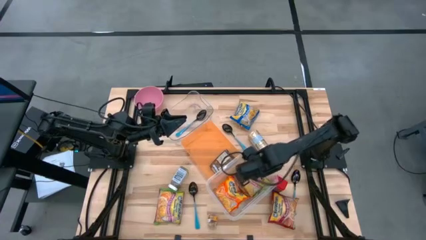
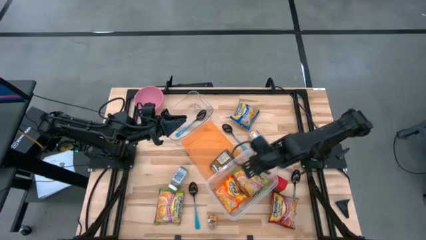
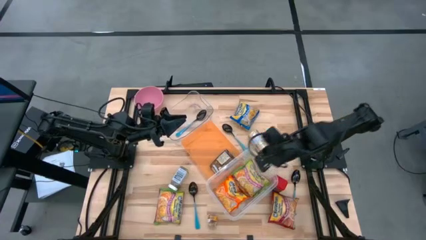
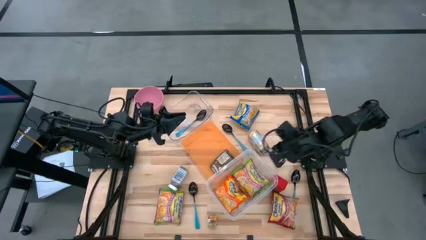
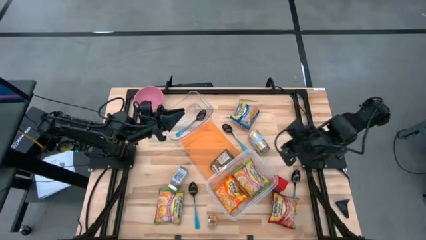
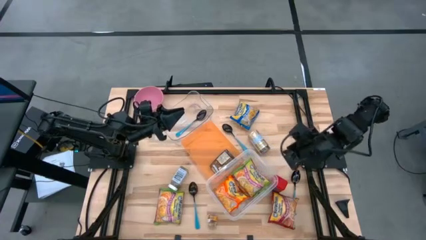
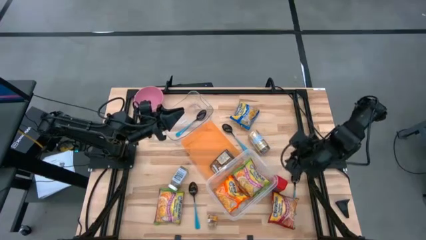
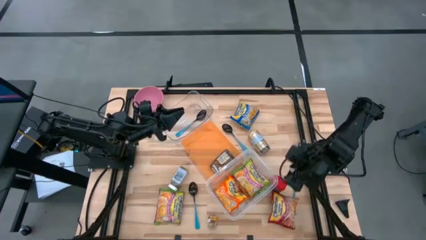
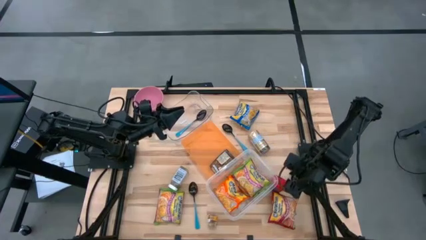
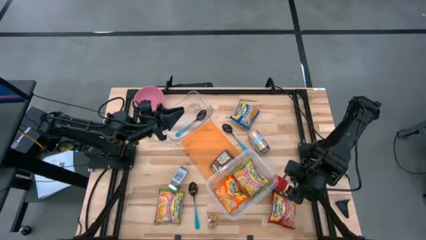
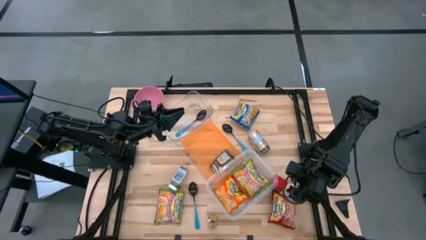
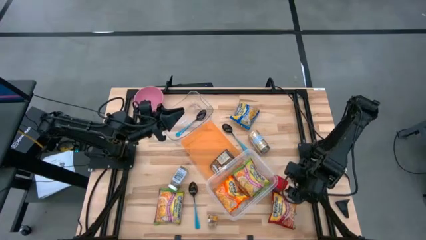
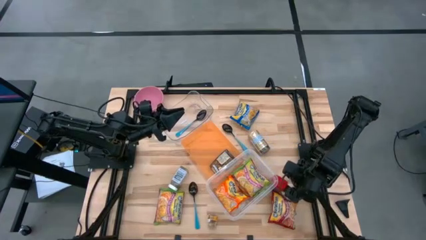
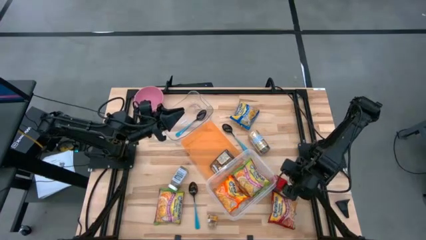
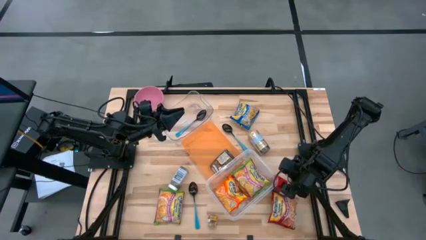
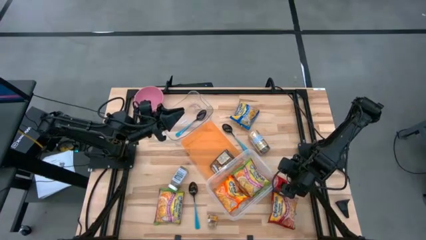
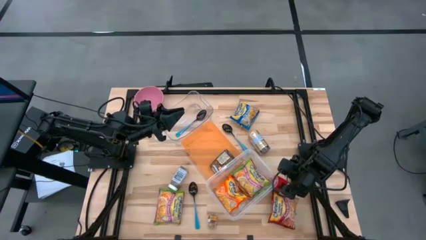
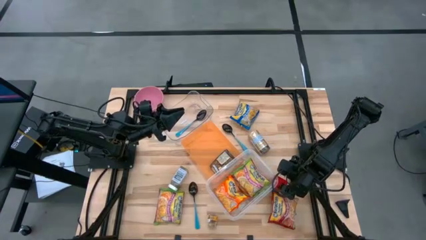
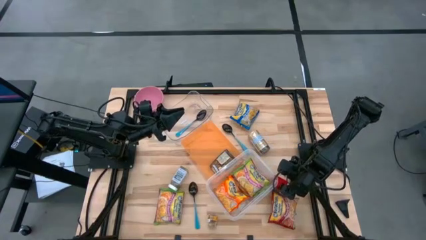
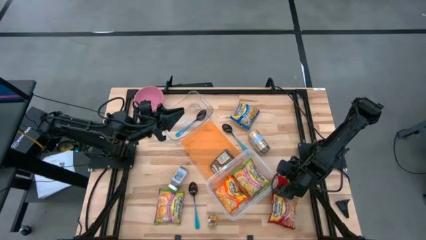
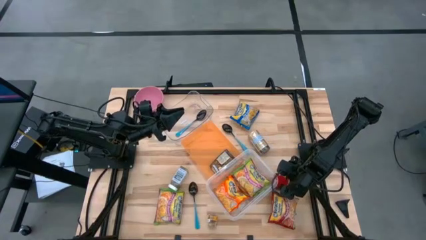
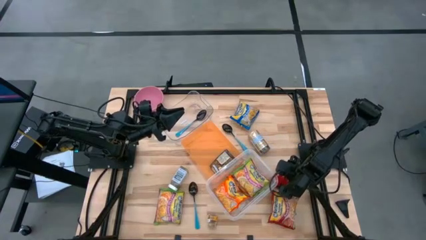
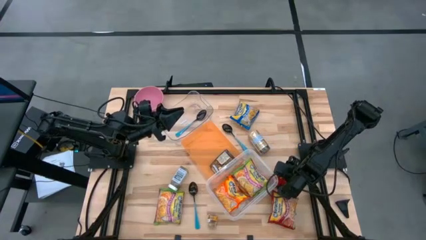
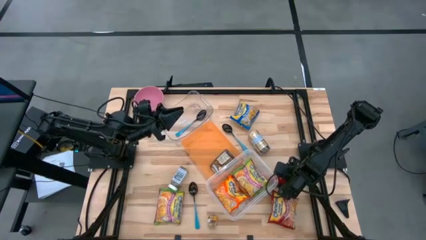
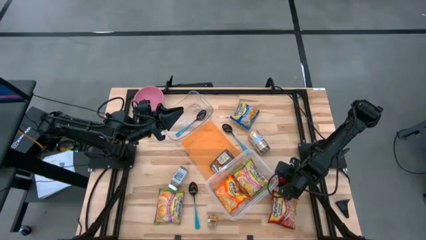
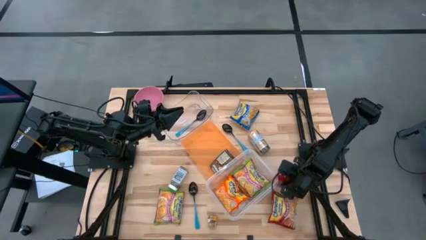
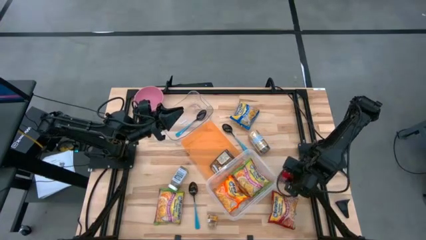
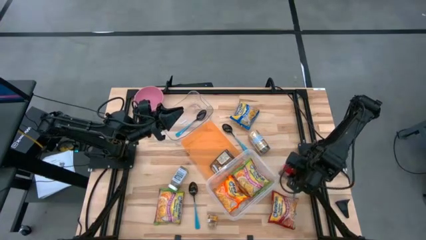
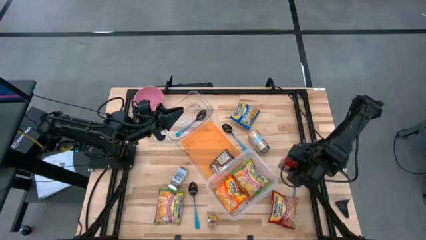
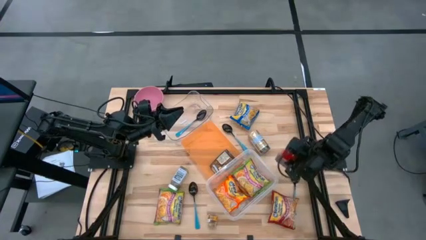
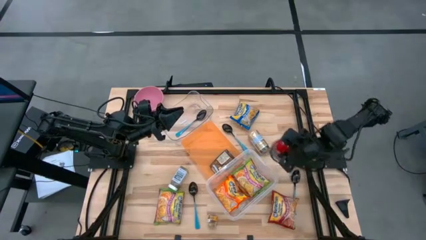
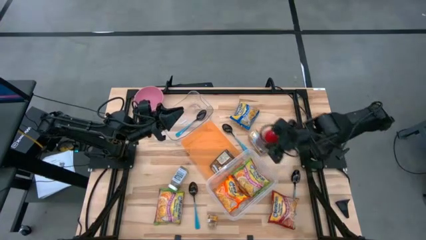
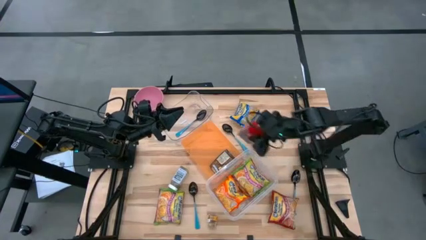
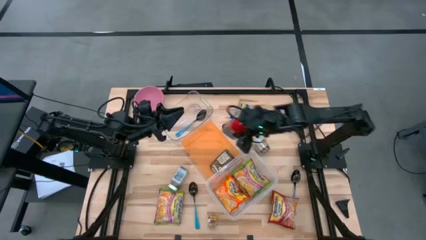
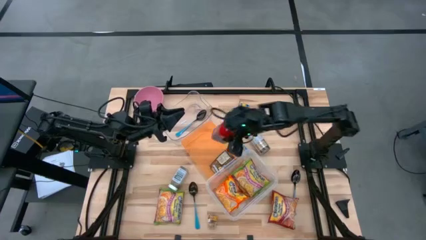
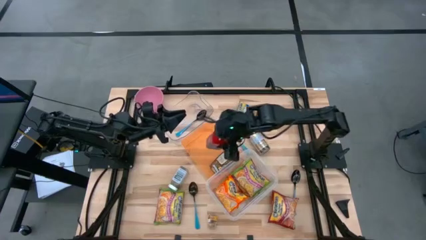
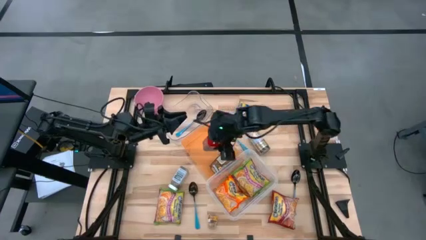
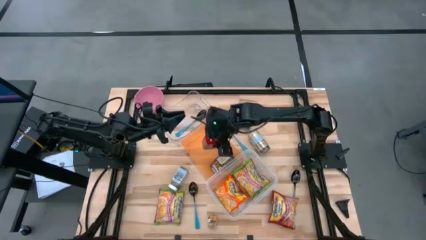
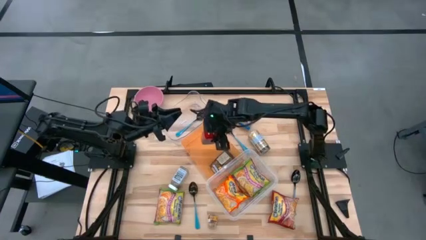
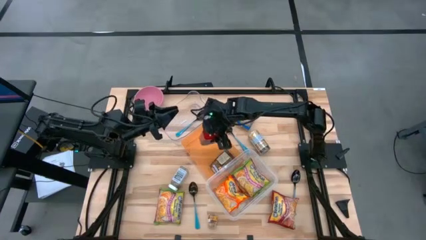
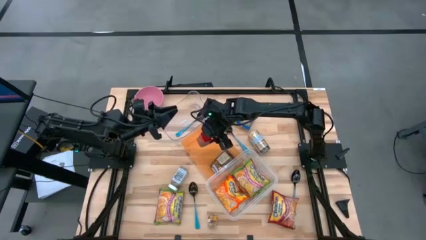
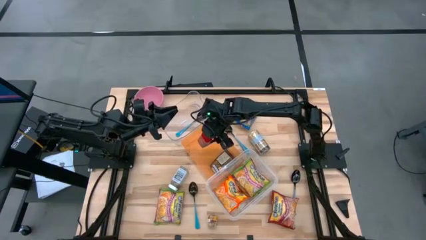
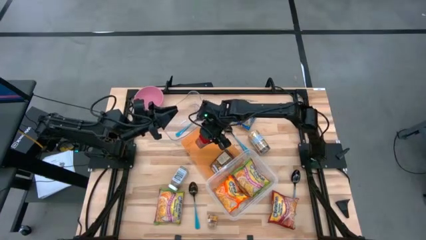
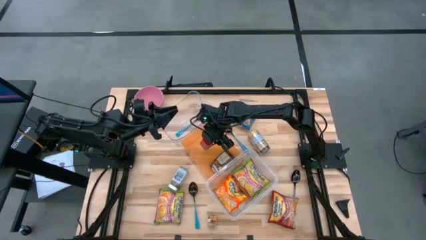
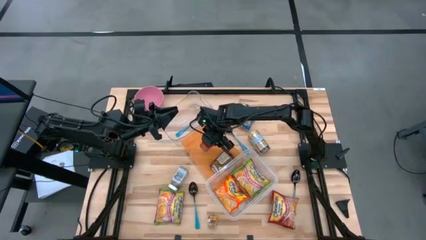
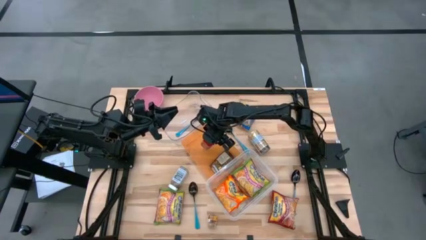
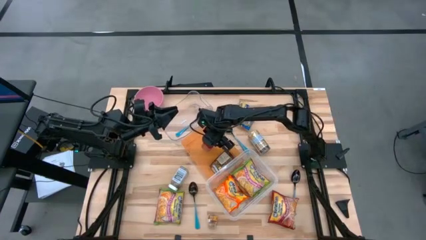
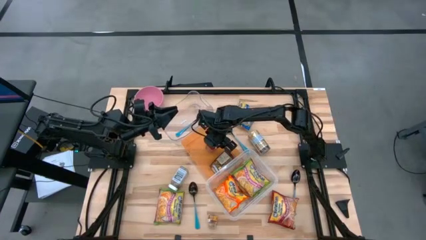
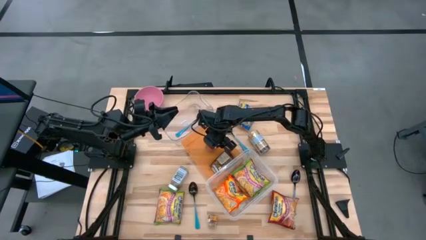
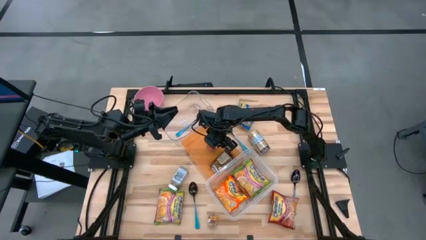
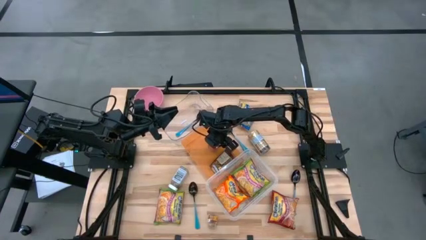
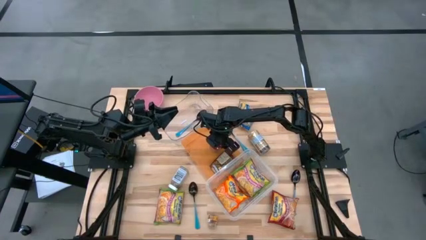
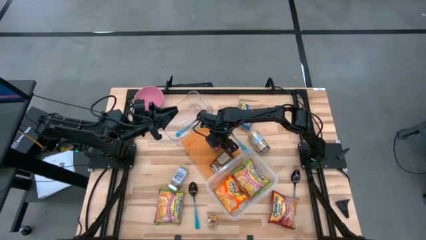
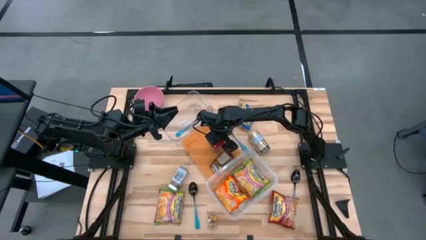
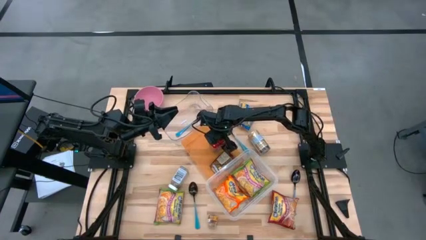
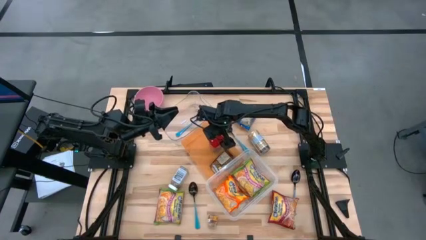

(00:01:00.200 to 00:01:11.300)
Task: Pick & Place Food Item
Put the red seasoning can into the orange bin
